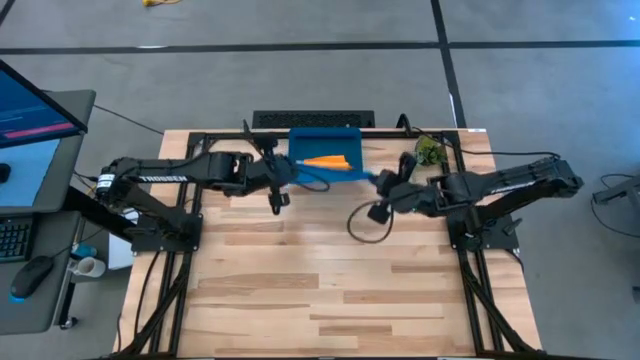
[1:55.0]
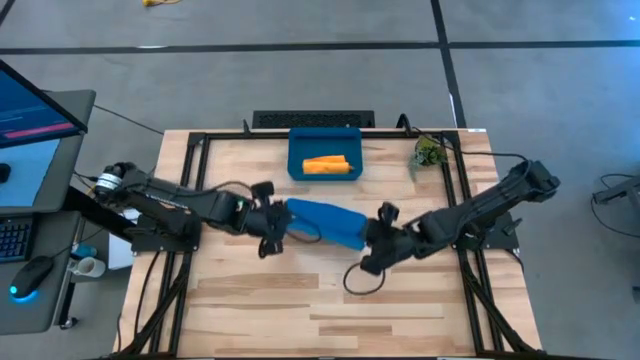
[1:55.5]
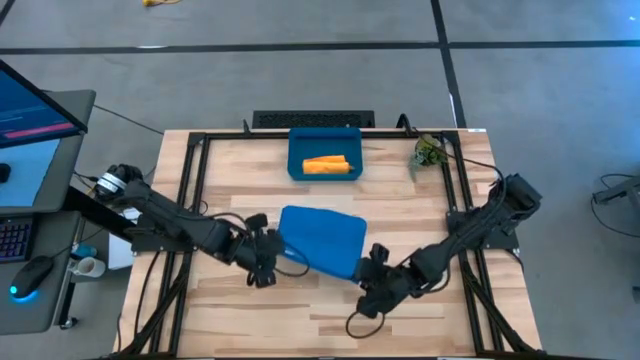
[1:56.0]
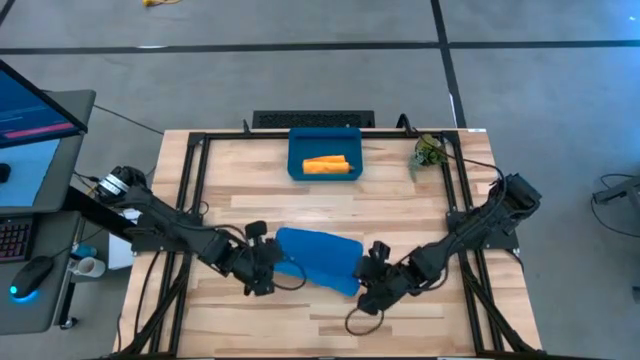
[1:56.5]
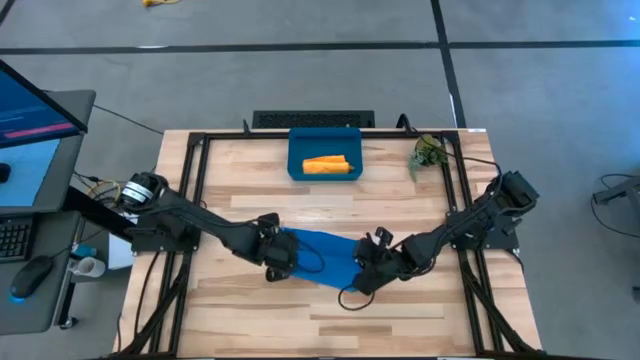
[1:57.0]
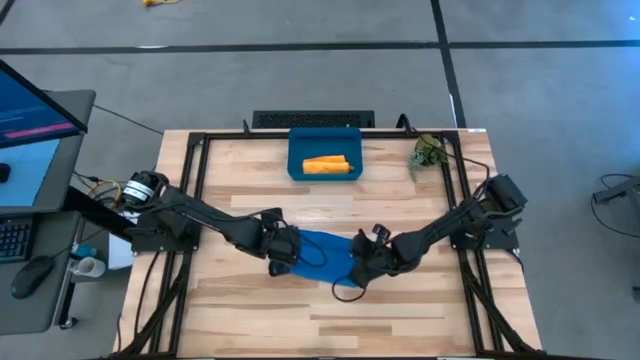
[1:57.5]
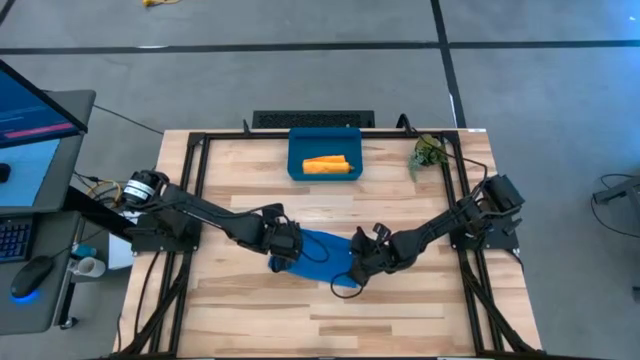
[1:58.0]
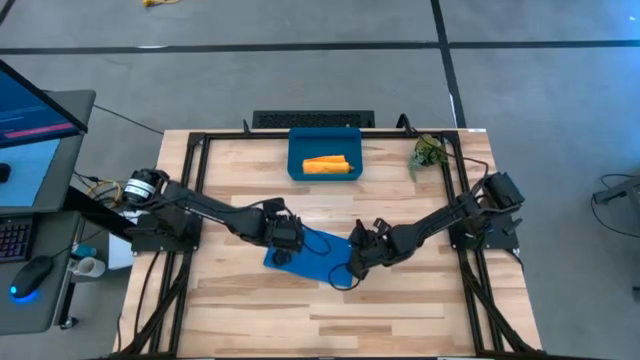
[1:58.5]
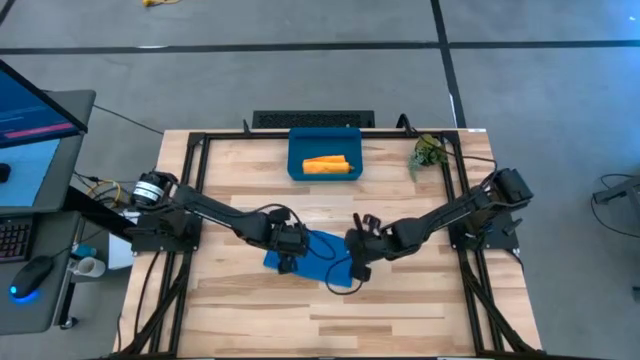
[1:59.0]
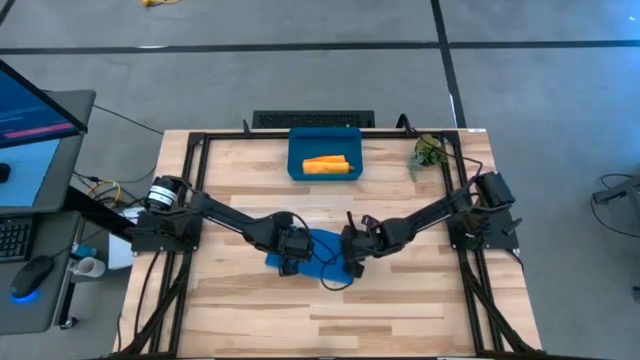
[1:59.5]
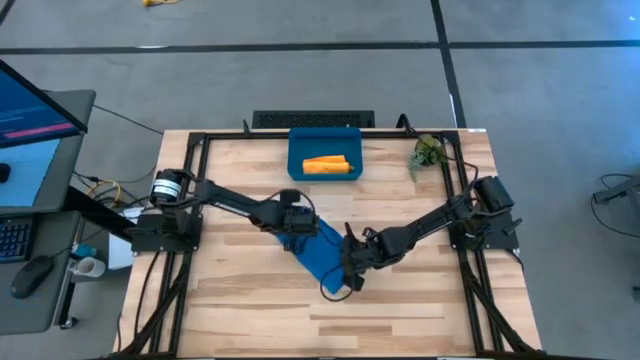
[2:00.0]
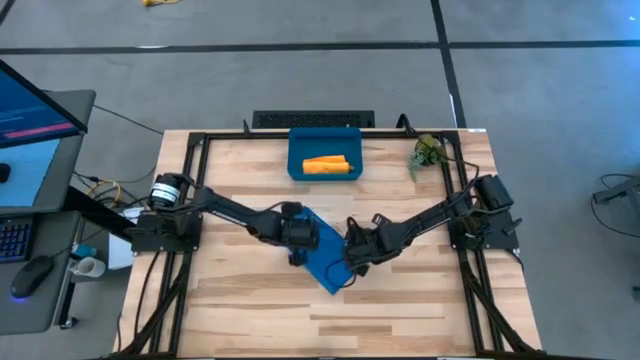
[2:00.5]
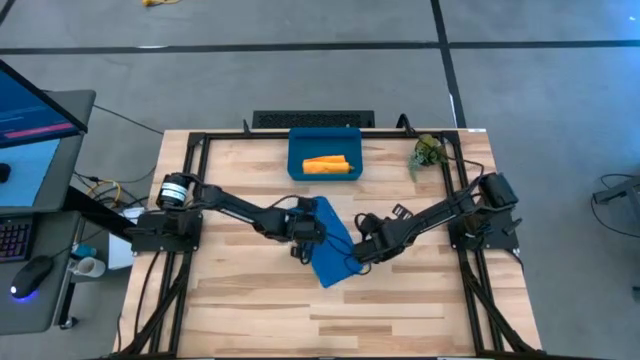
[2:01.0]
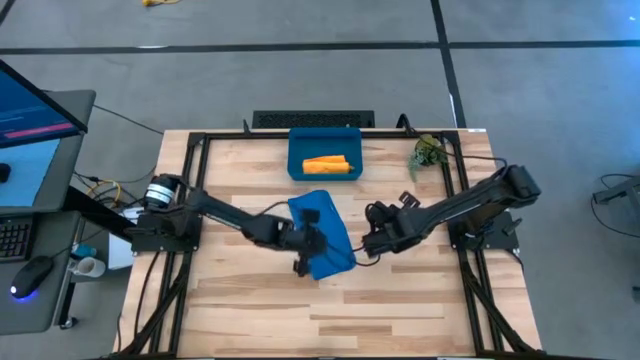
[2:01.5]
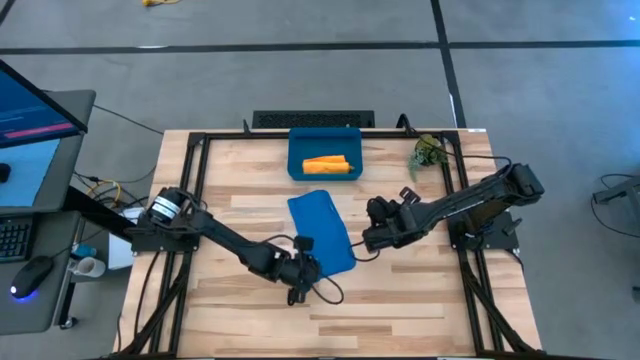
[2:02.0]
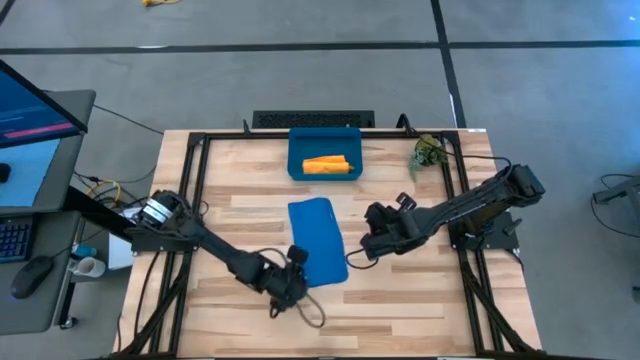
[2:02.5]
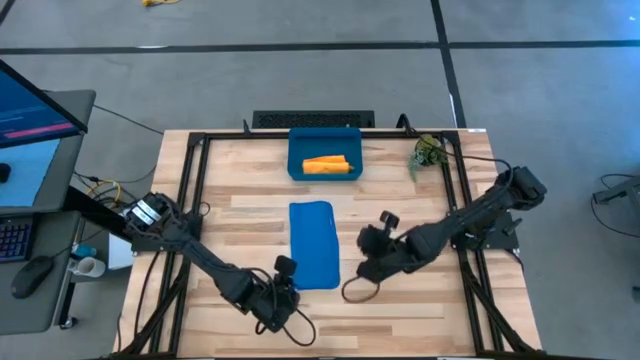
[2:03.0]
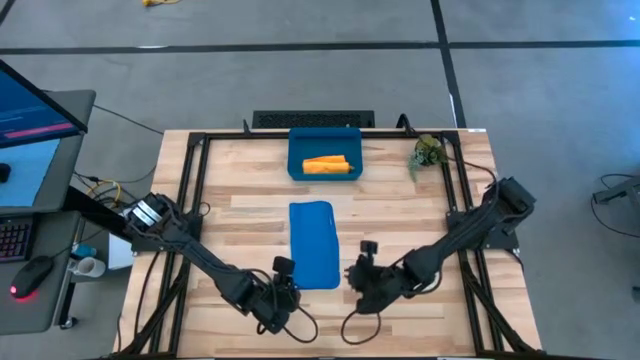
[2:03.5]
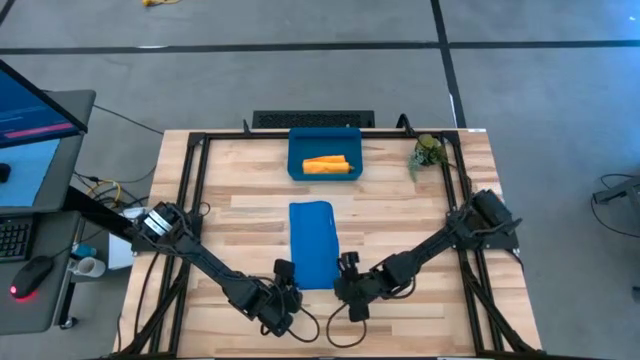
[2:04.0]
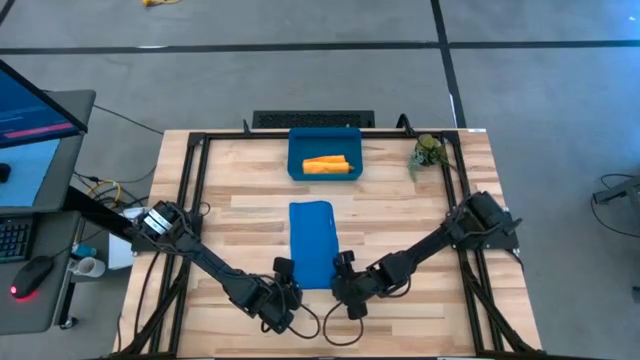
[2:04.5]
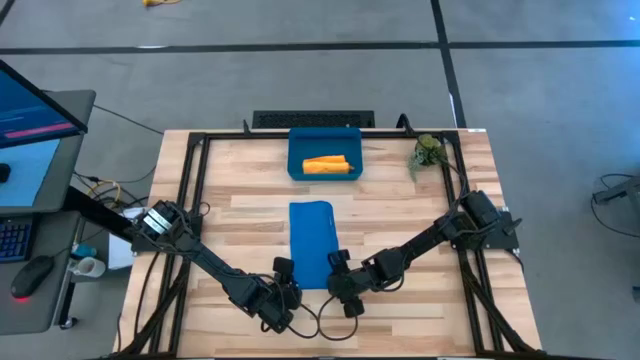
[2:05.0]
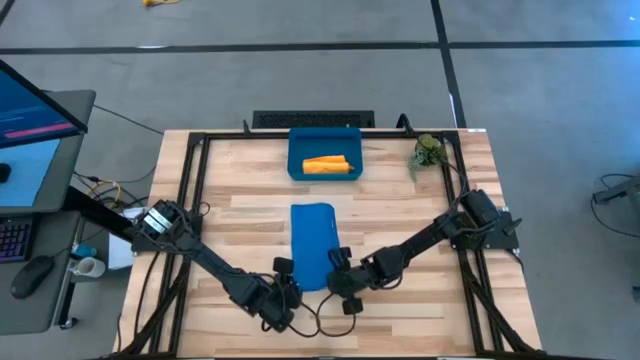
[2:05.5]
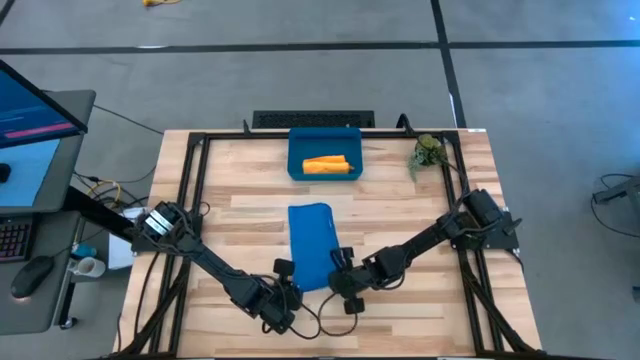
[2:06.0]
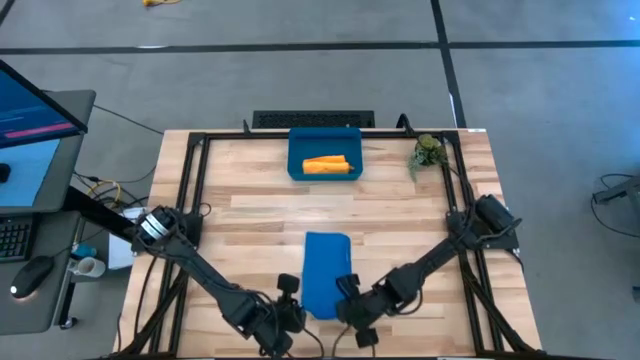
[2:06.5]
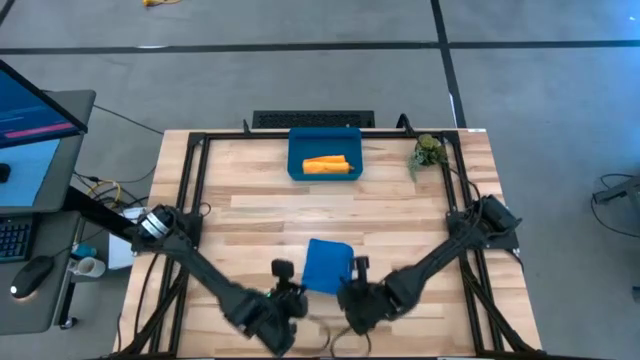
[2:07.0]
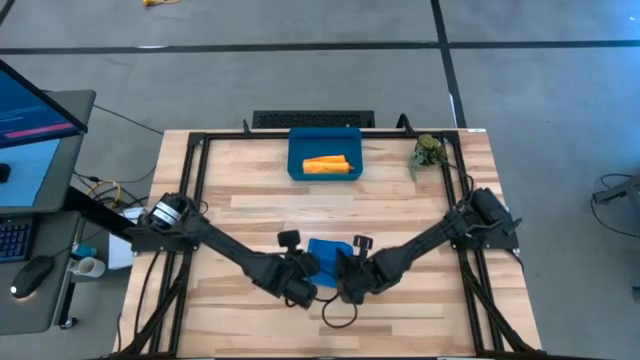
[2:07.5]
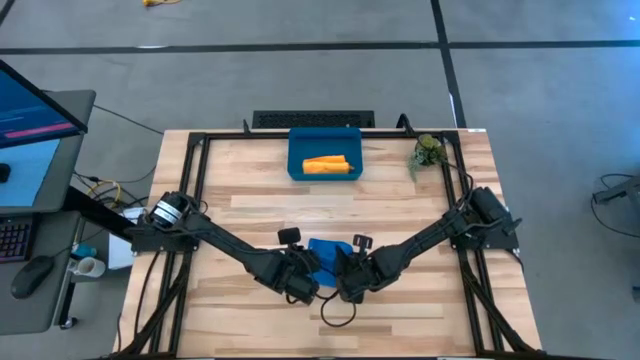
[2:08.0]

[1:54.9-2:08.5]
Task: Roll microfiber towels into tight, uniform cylinder then place into a basket
Fold the blue microfiber towel

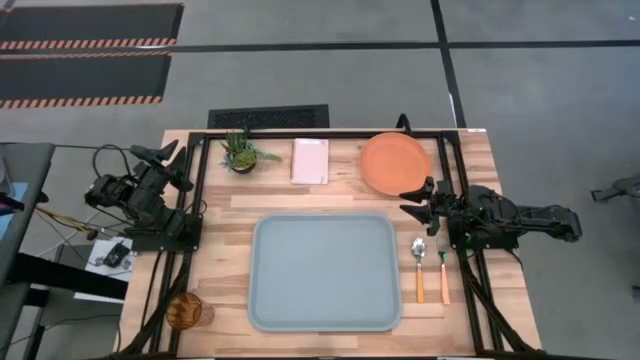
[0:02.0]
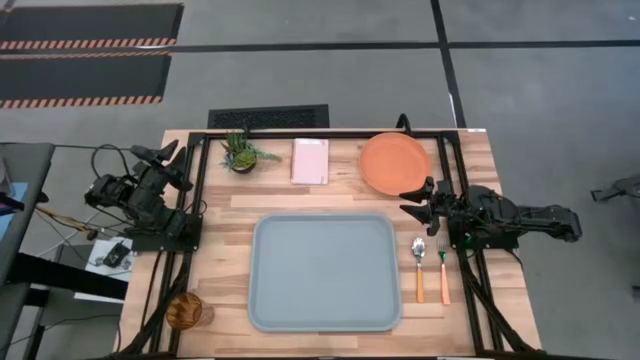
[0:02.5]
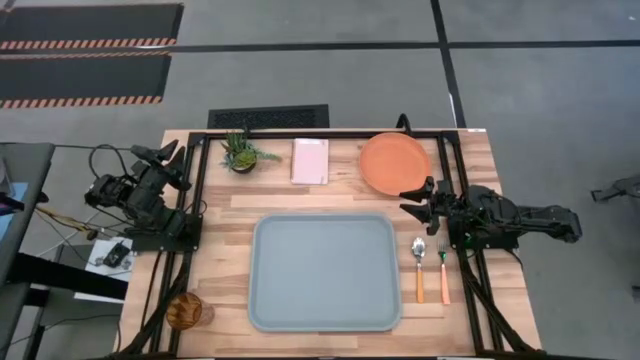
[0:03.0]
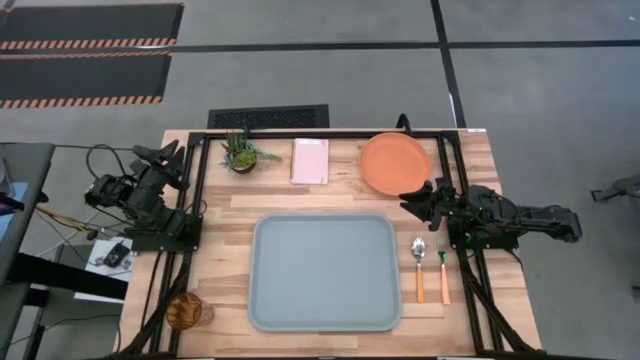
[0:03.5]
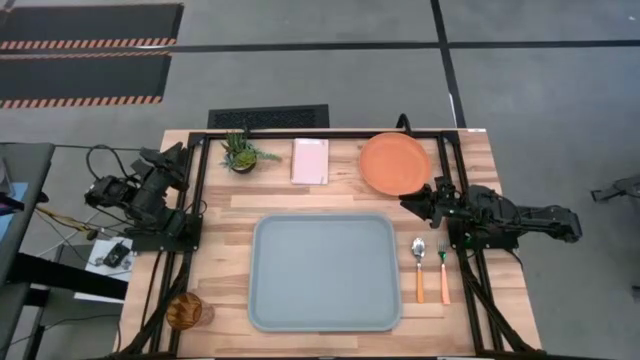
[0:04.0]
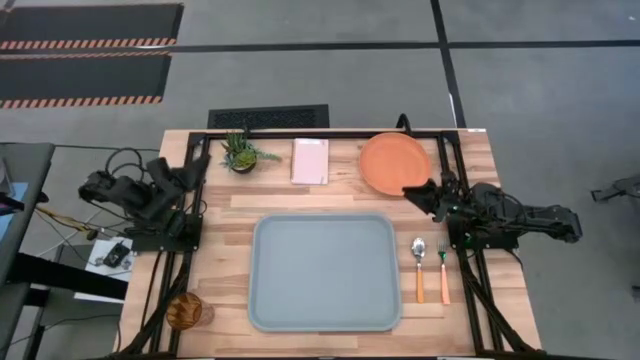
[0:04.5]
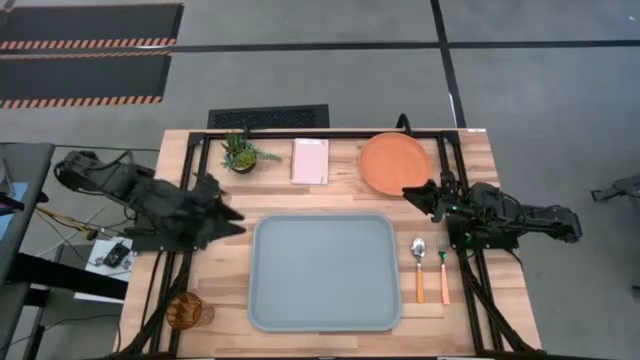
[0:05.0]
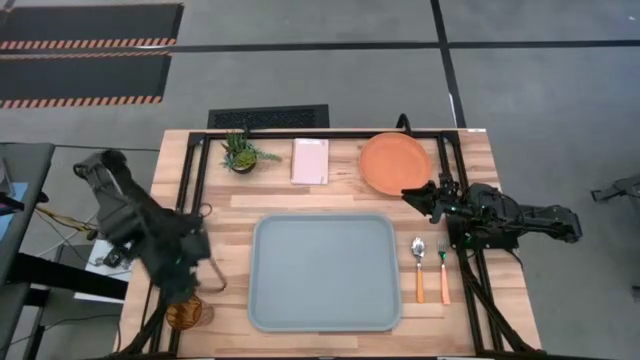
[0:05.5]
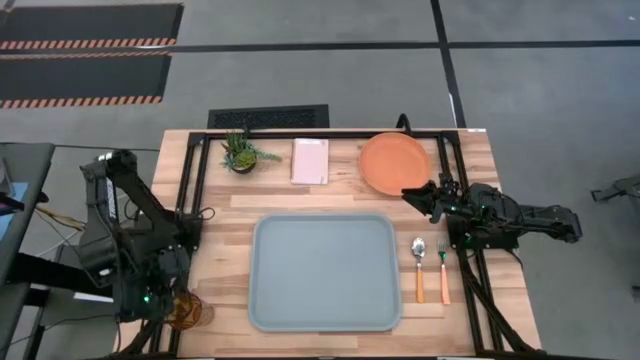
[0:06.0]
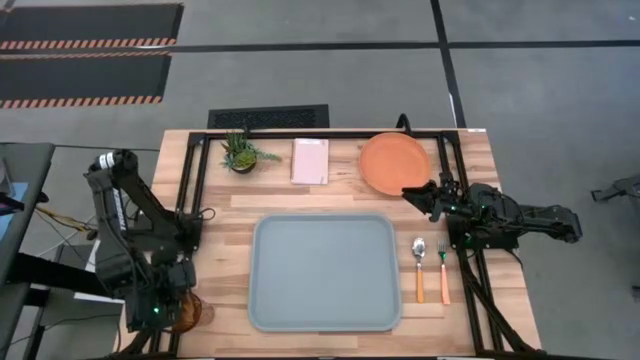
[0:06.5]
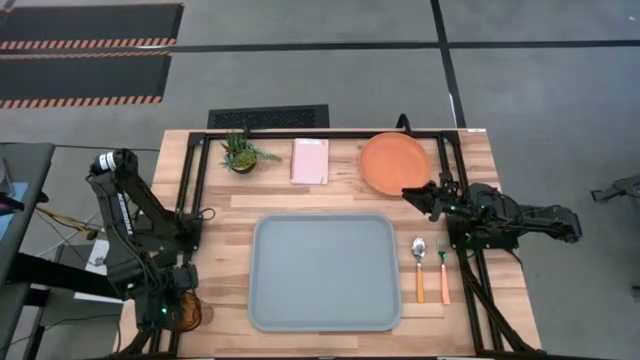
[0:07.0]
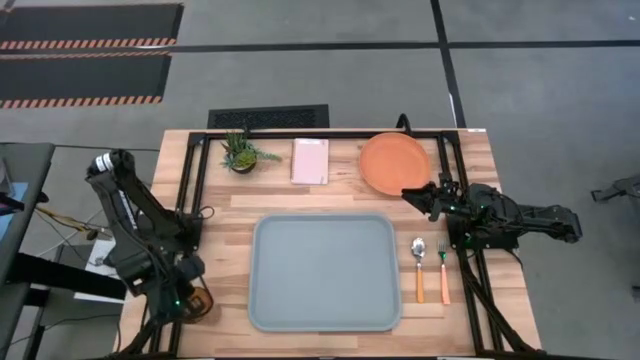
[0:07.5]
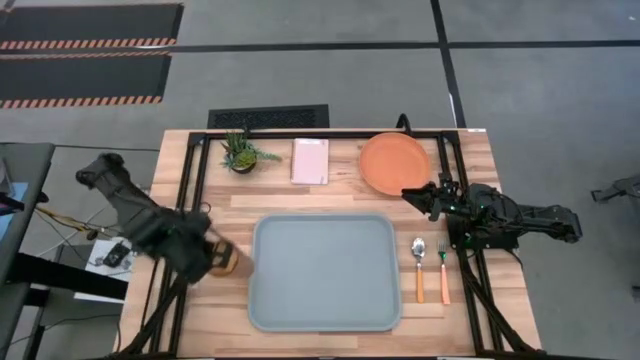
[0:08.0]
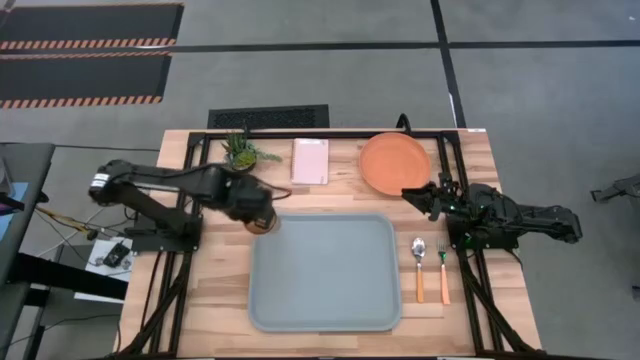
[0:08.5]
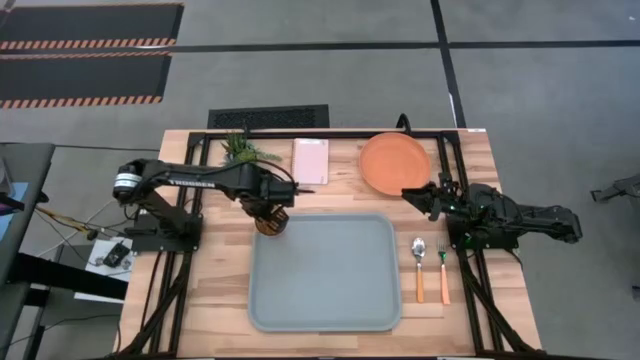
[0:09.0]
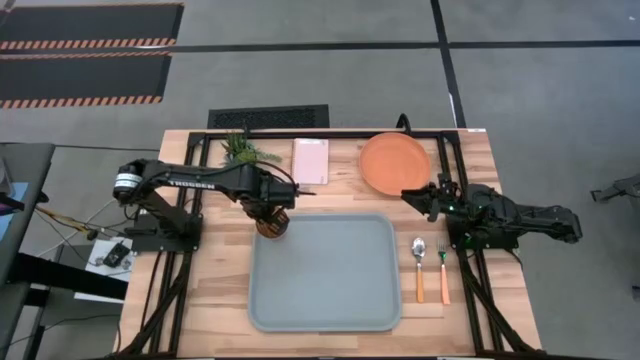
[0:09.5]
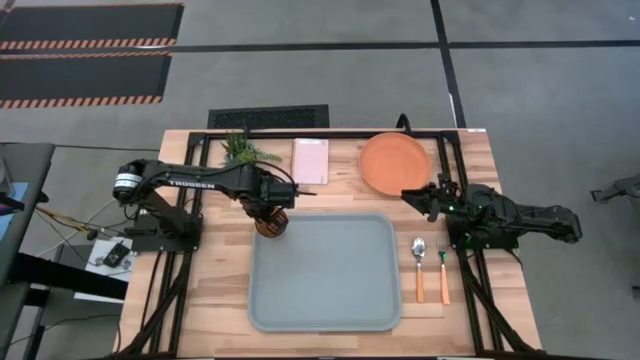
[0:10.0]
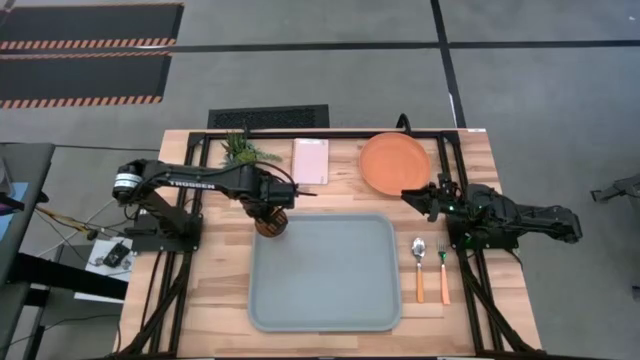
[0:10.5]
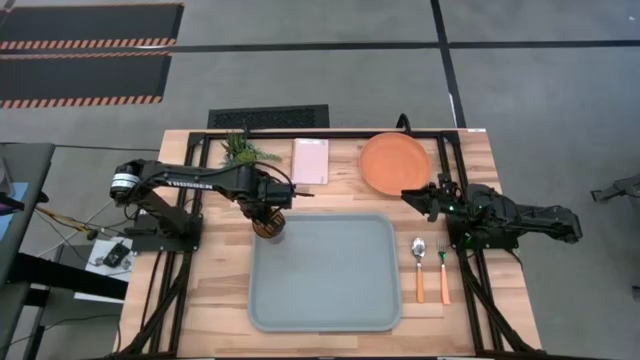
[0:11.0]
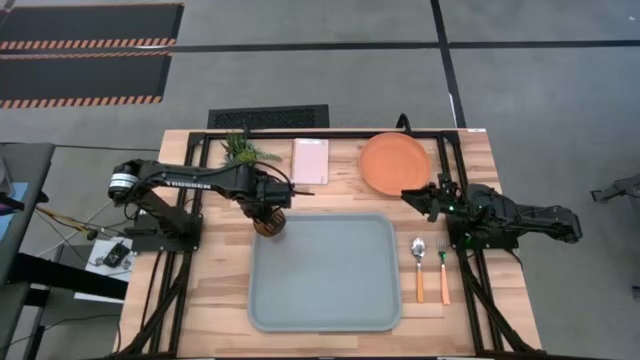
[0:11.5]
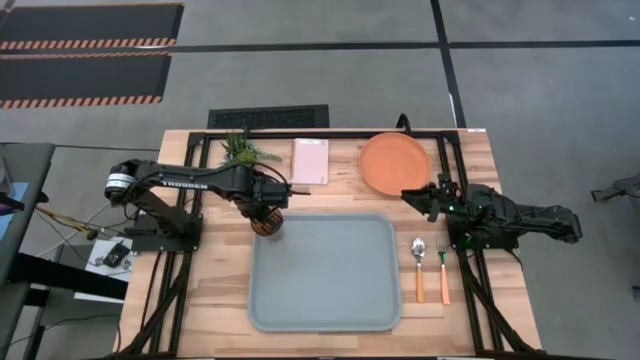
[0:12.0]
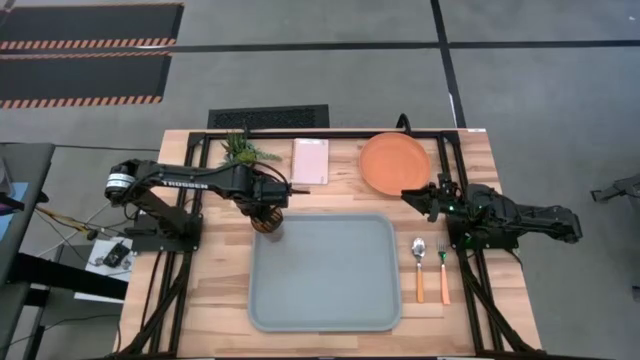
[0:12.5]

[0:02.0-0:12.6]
Task: Pick and place plate/cup/fork/spoon on tray
Put the brown glass on the gray tray
